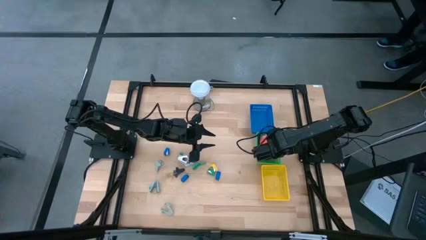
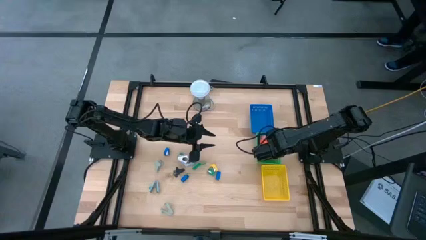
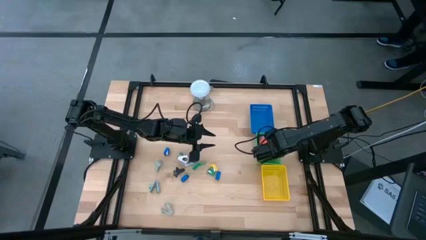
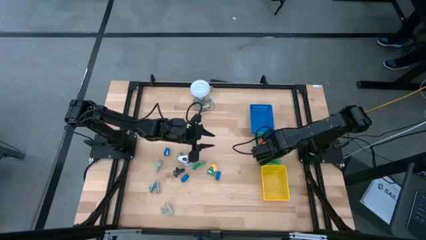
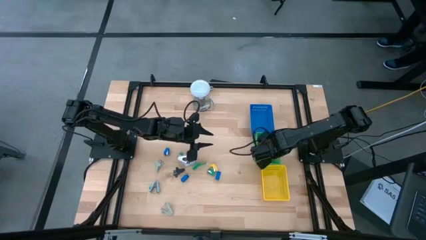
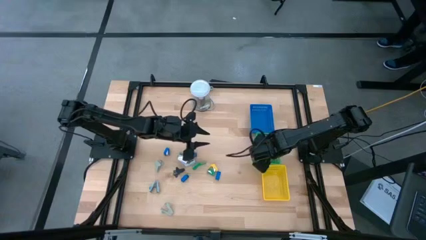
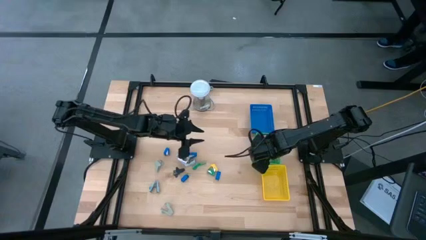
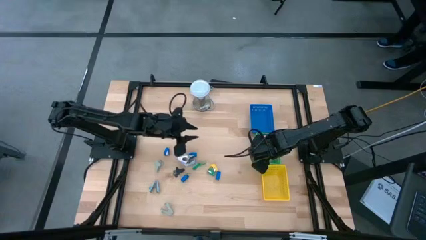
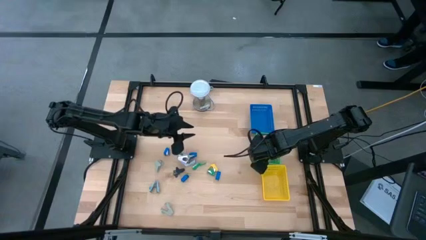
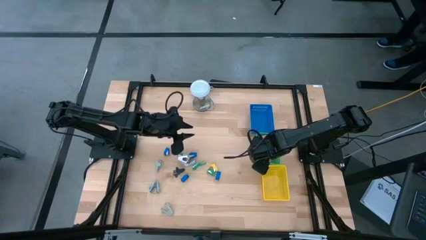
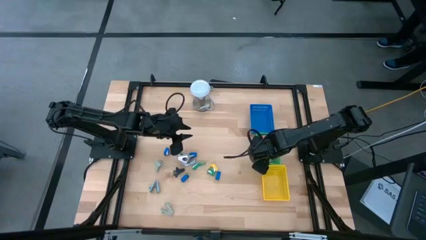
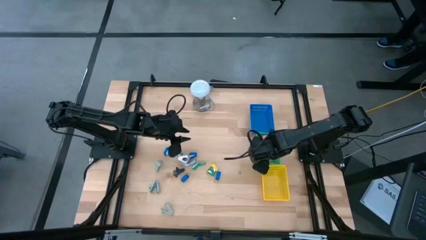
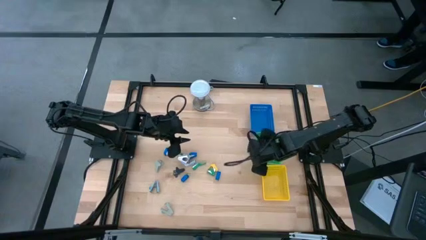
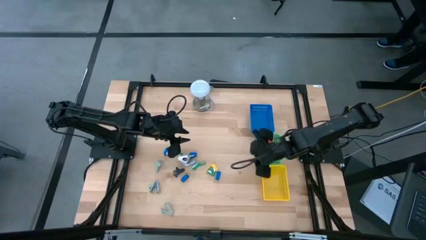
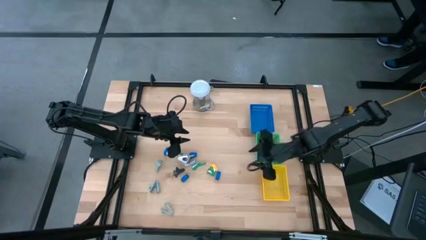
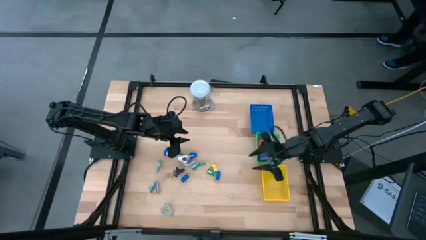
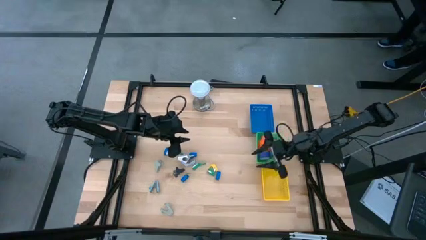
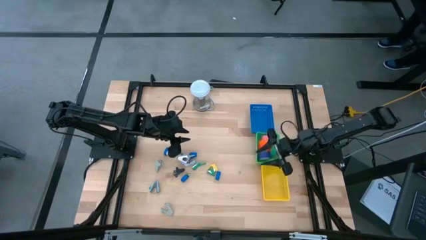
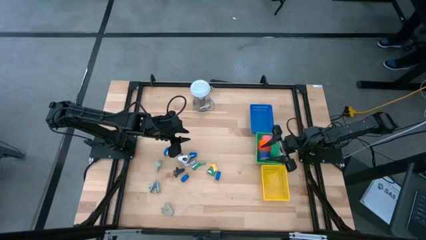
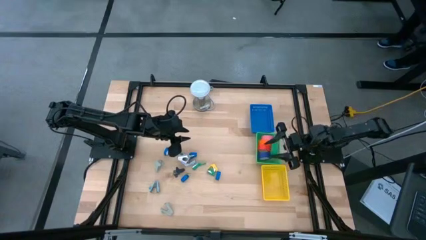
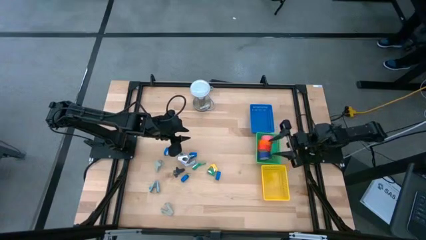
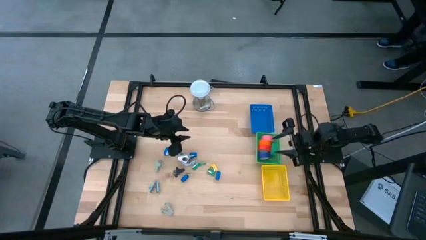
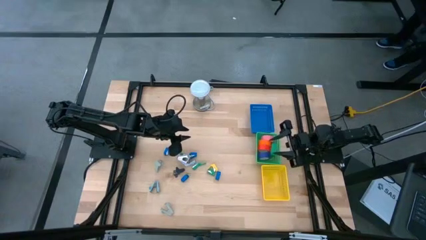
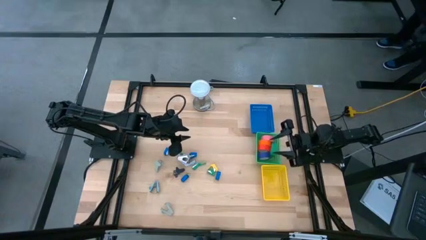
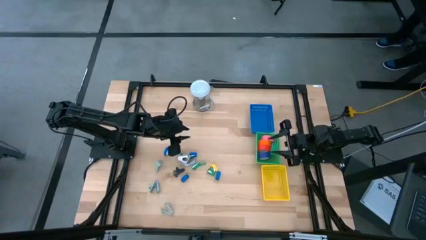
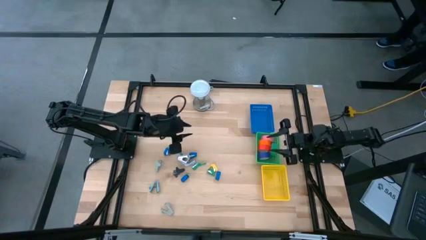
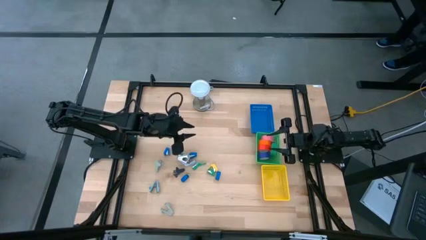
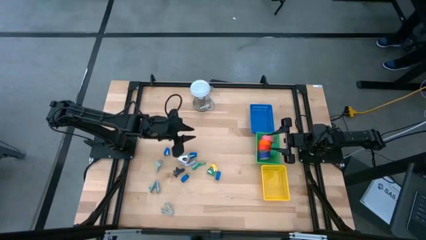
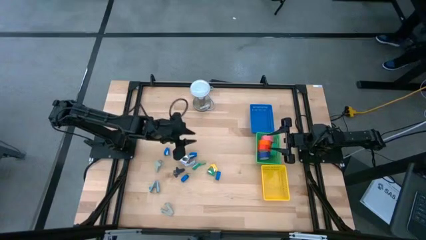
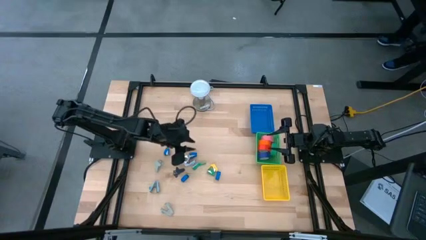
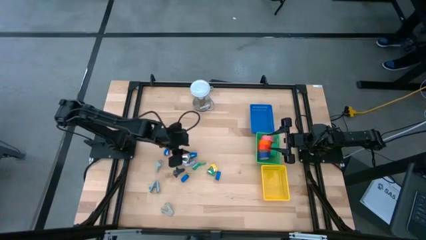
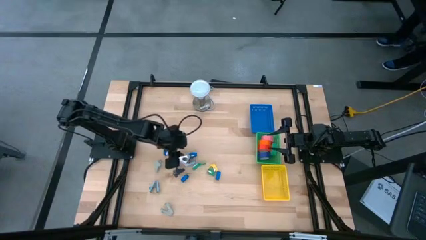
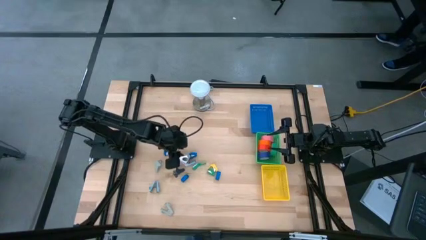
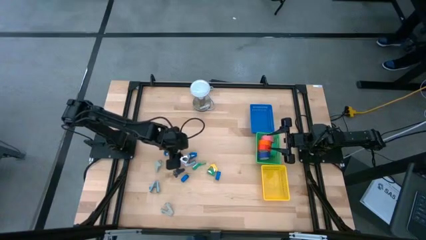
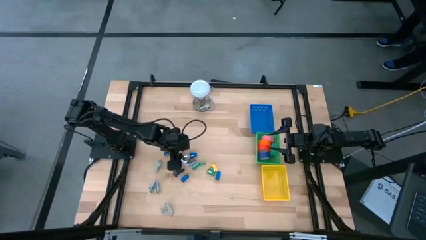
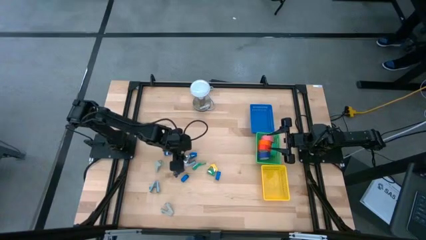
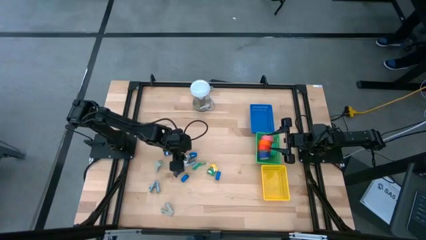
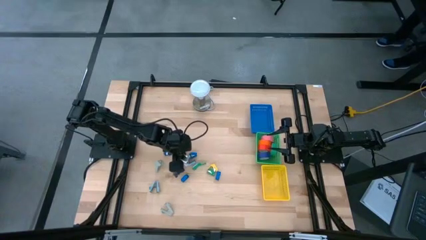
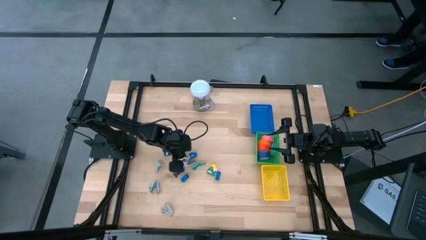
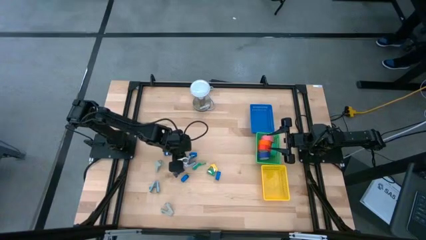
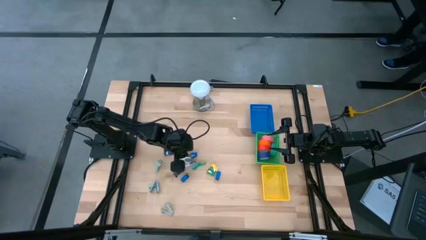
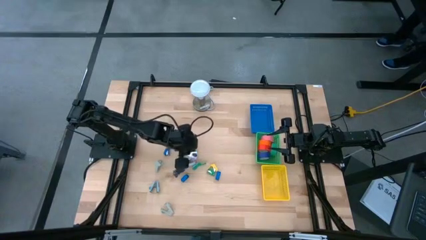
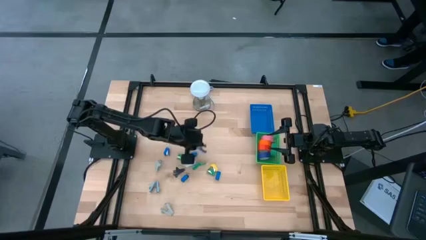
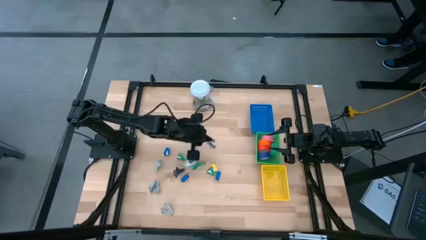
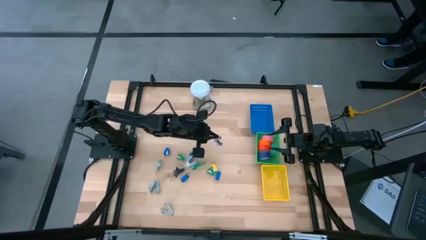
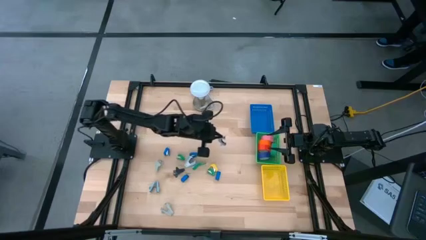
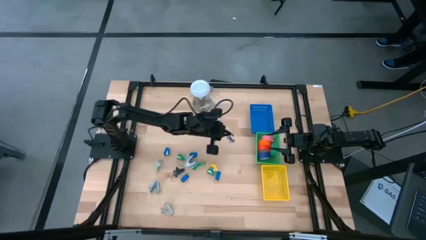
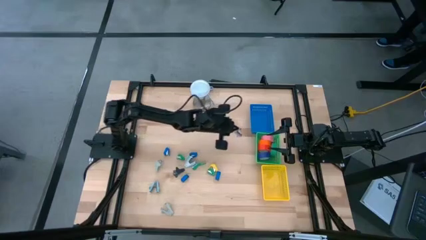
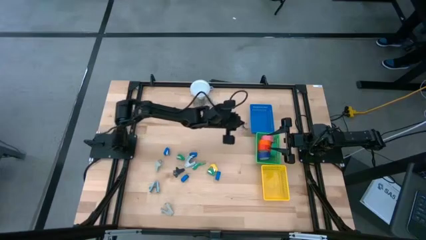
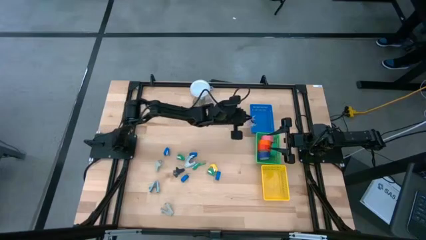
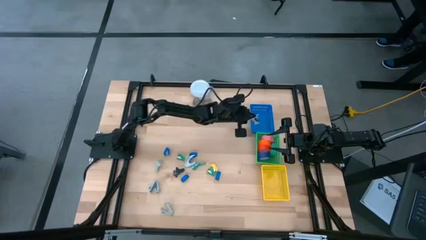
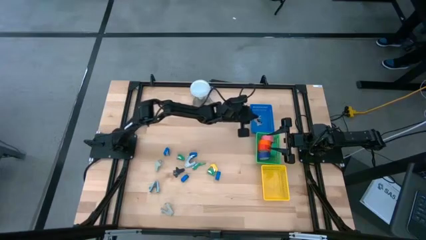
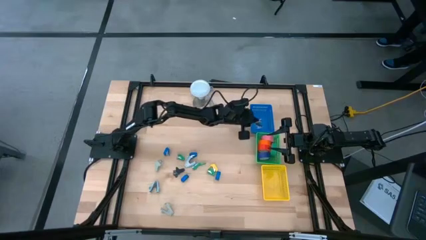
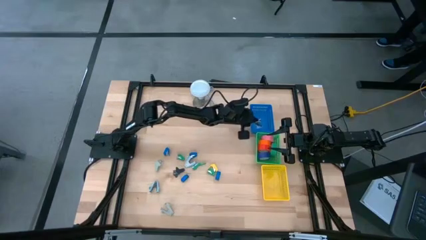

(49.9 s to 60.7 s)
Task: Pick and place Stapler, Stapler remover, tape
Put the violet stapler remover into the blue bin

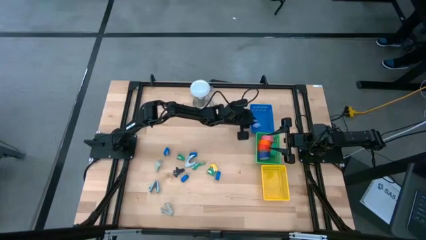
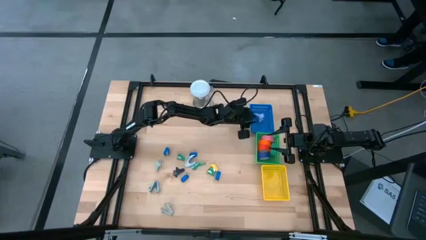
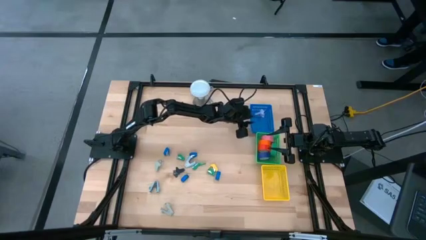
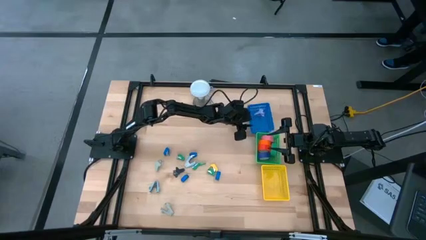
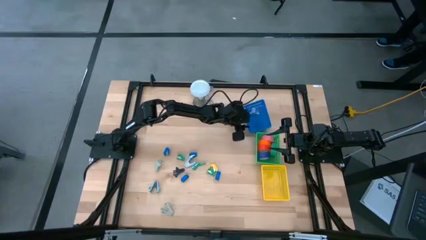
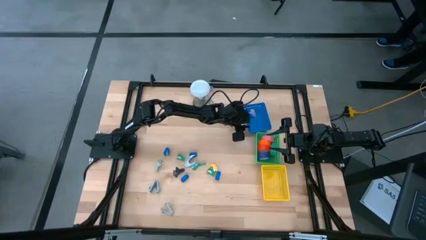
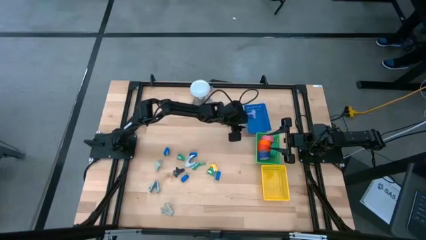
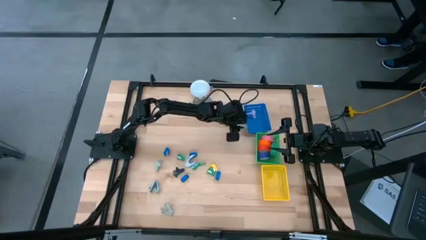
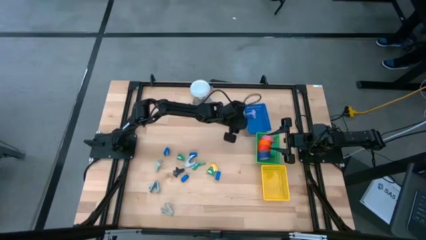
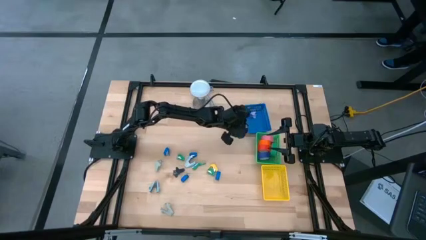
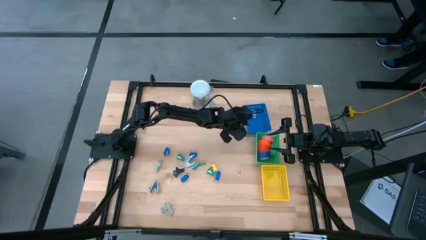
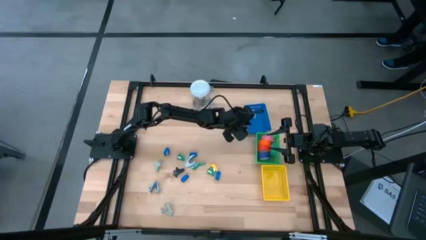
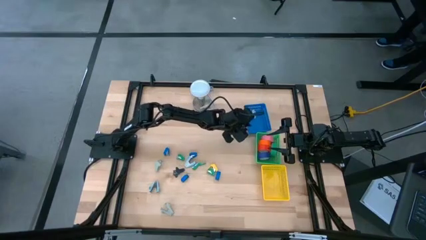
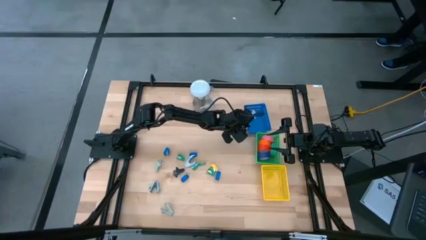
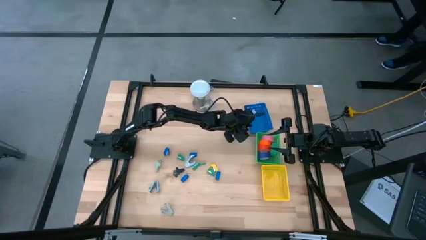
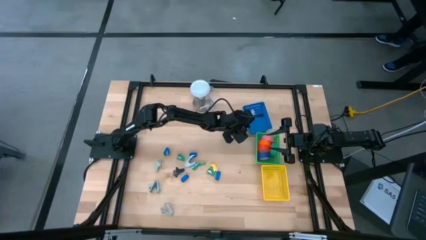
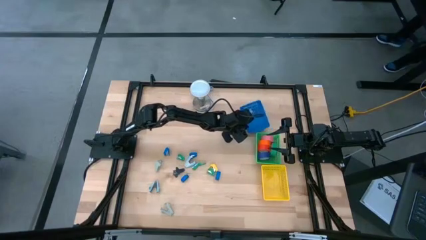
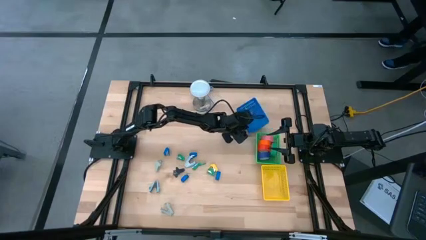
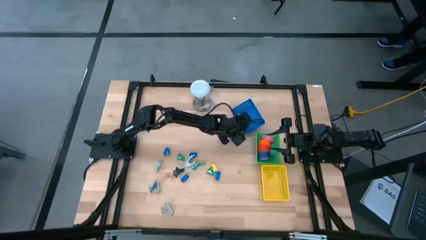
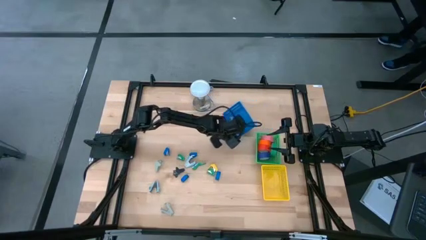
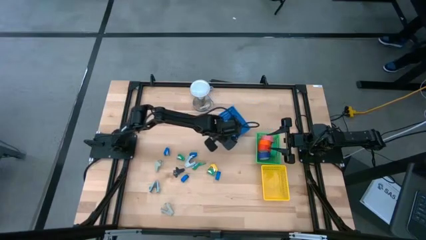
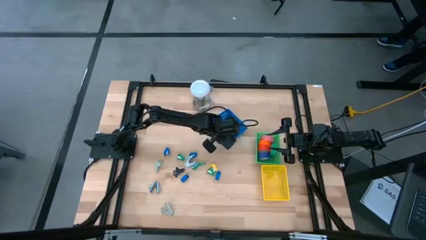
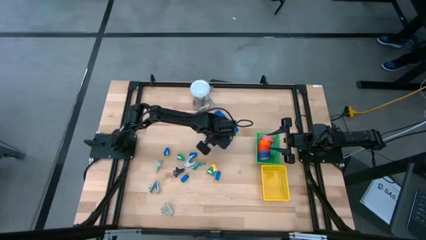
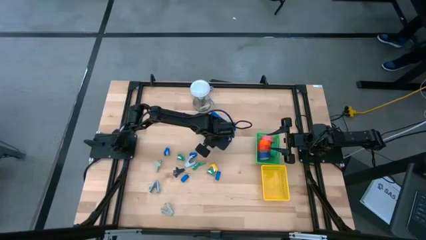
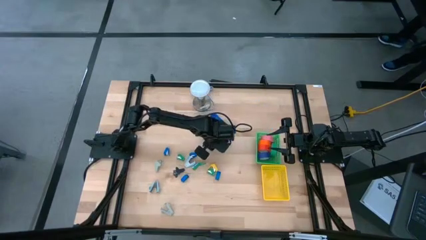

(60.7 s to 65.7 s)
Move the blue bin to the center of the table

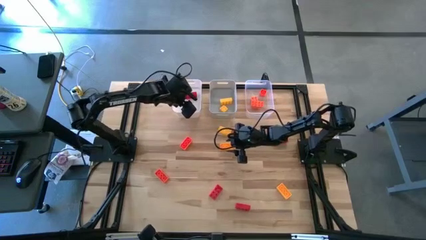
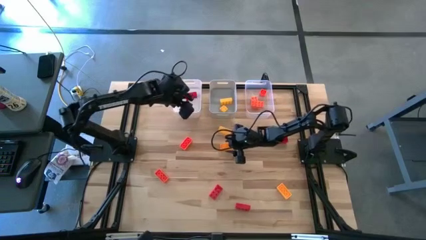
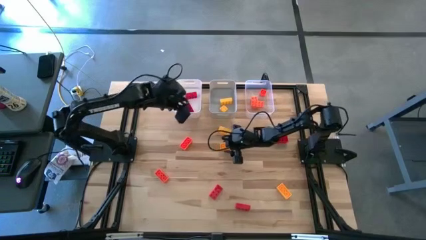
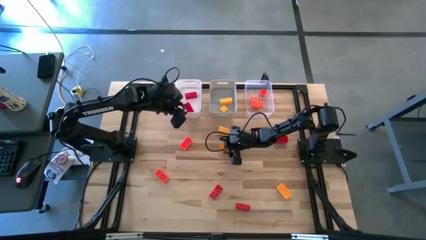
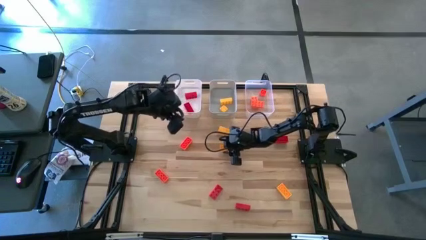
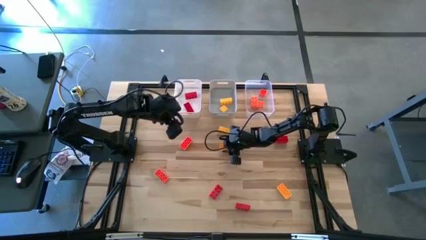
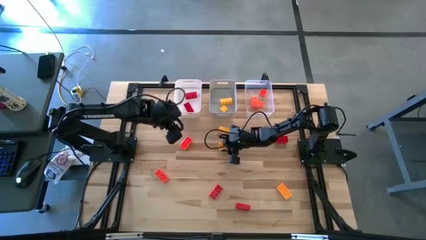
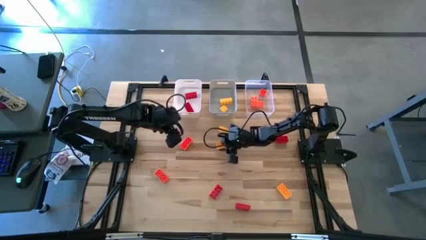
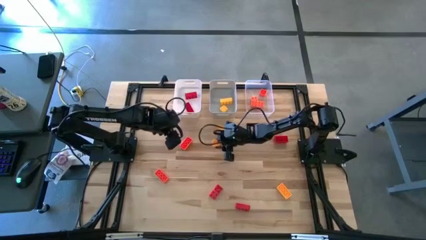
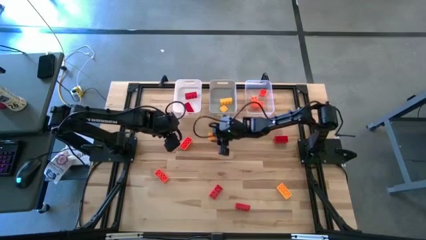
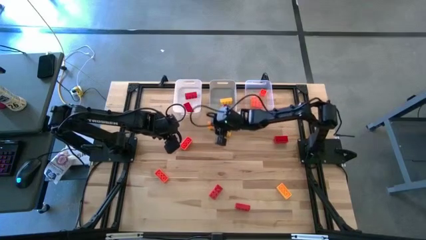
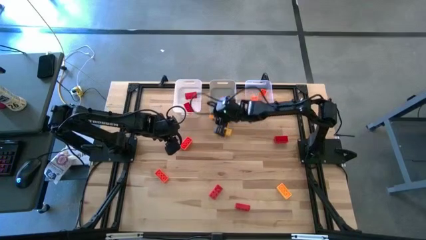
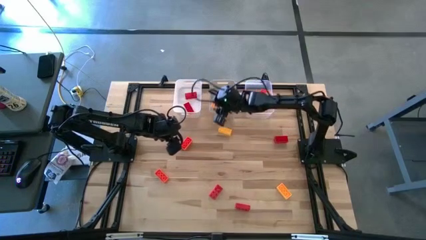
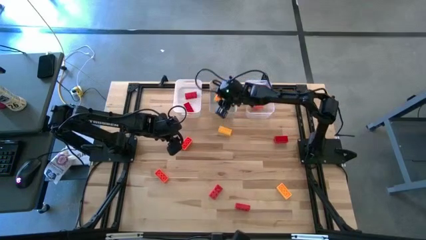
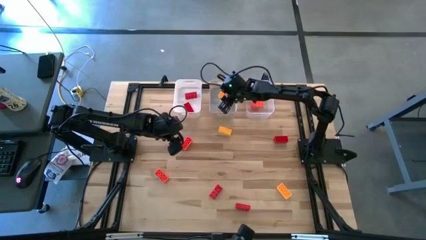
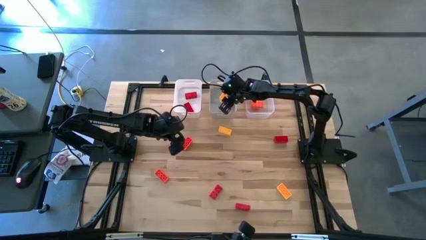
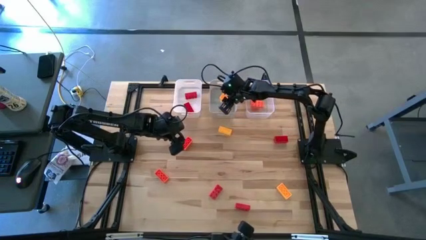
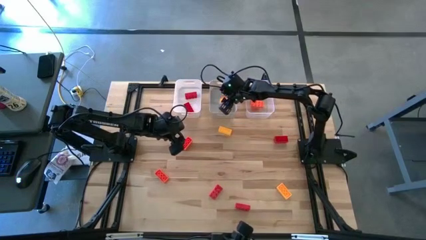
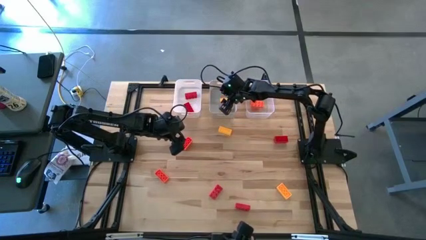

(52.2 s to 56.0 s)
Task: Sort & place blocks by color
Put the yellow game piece into the gray bin
